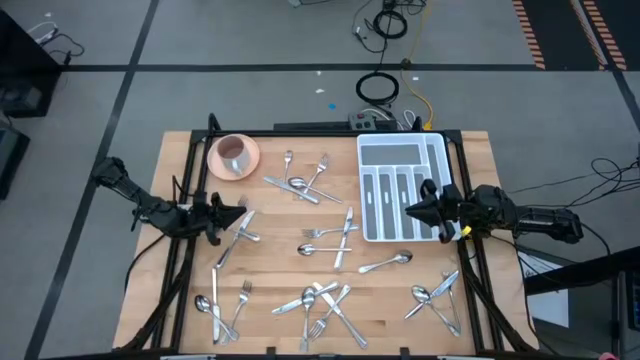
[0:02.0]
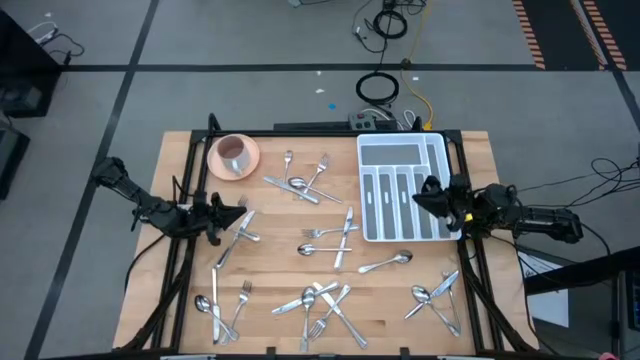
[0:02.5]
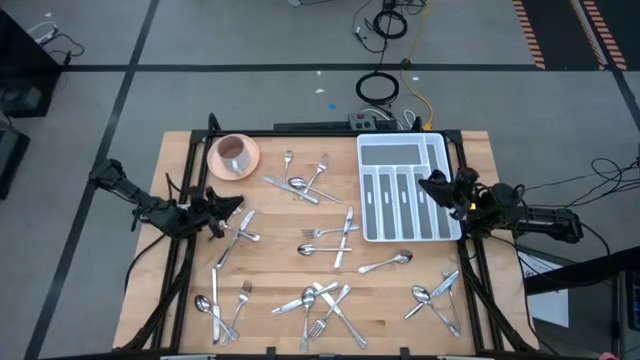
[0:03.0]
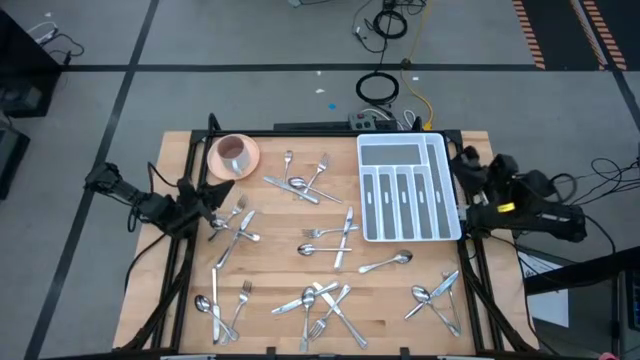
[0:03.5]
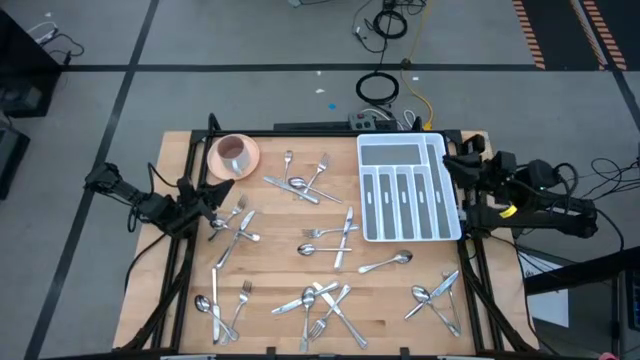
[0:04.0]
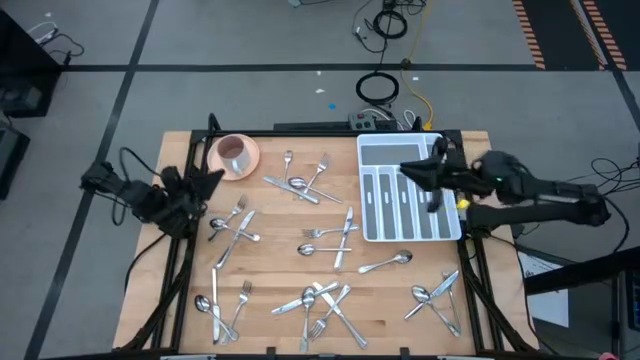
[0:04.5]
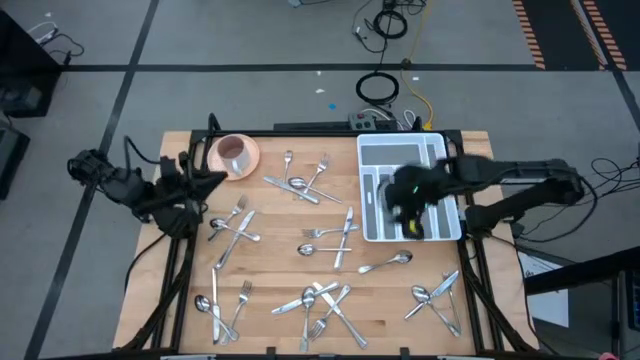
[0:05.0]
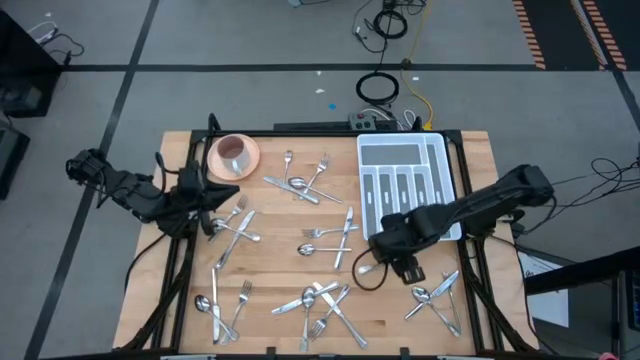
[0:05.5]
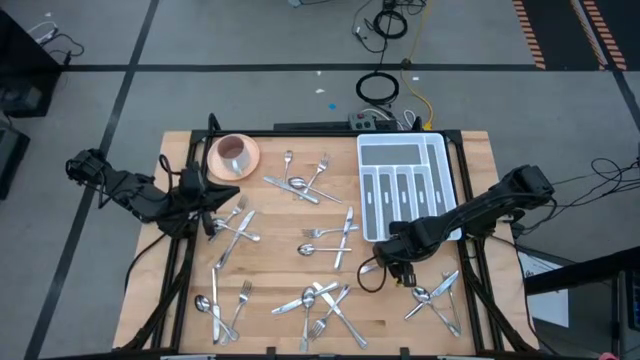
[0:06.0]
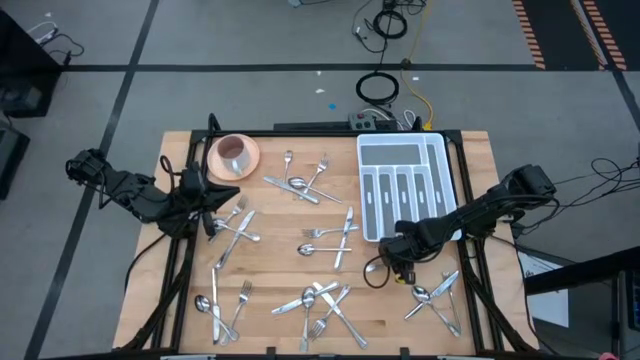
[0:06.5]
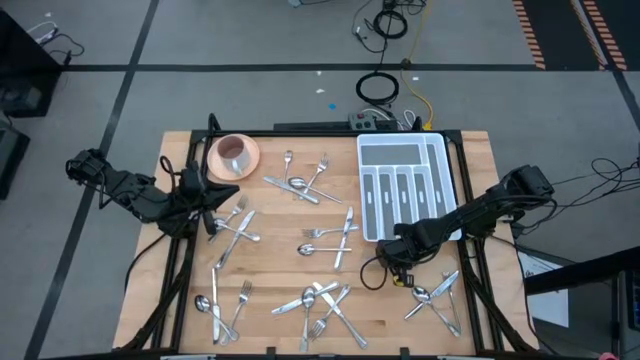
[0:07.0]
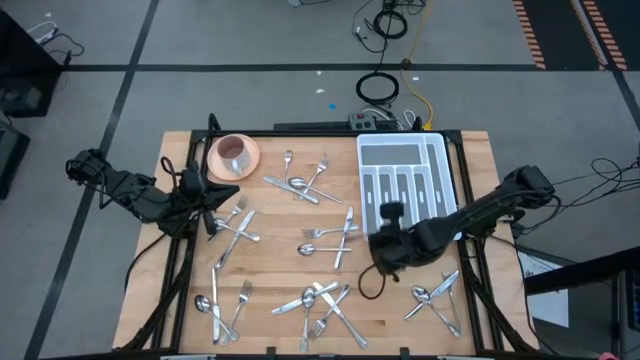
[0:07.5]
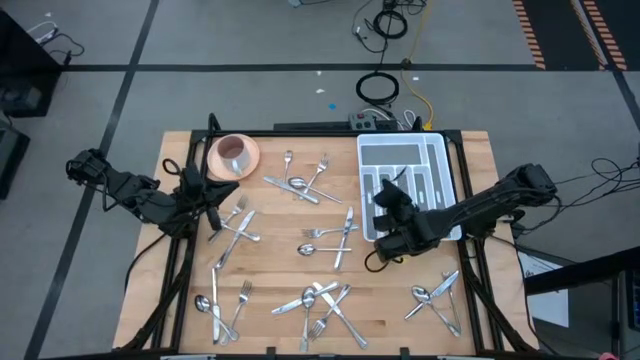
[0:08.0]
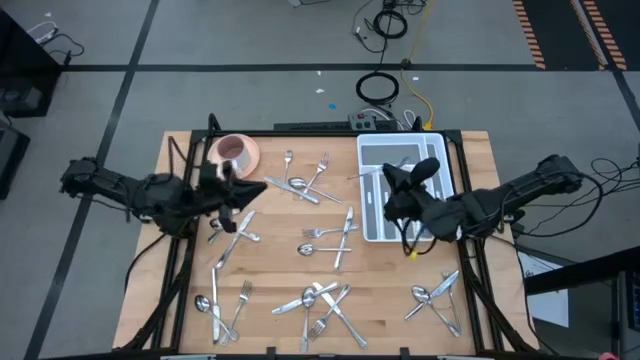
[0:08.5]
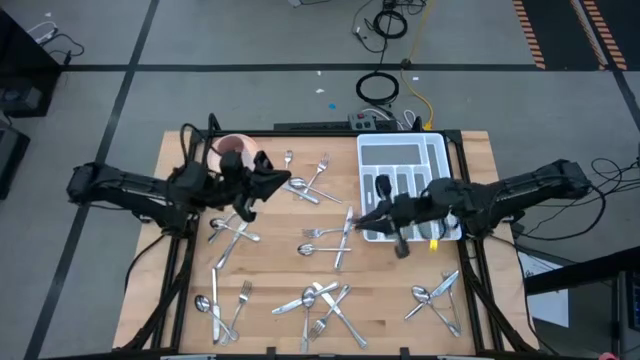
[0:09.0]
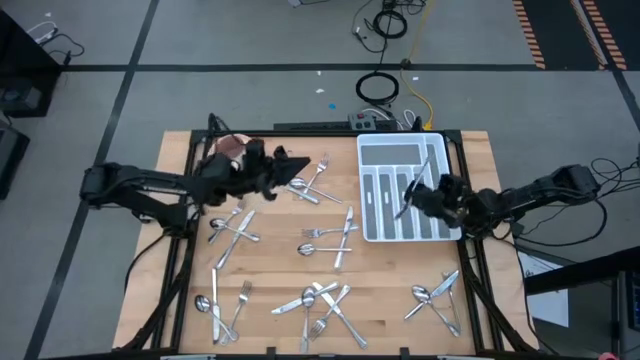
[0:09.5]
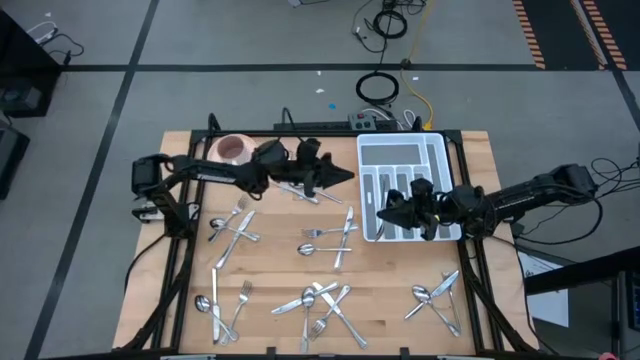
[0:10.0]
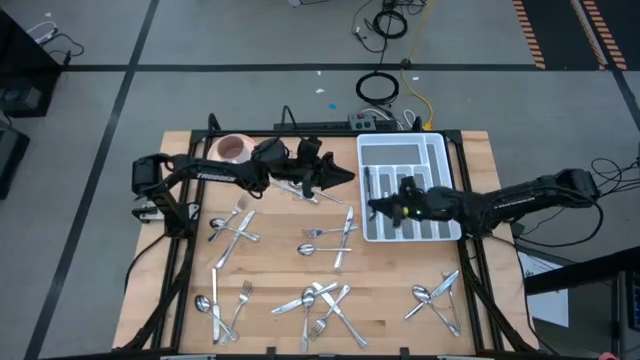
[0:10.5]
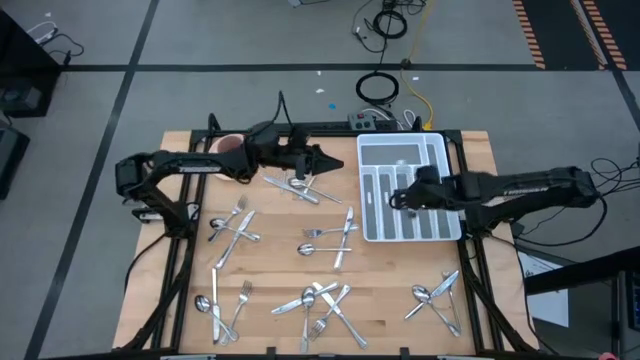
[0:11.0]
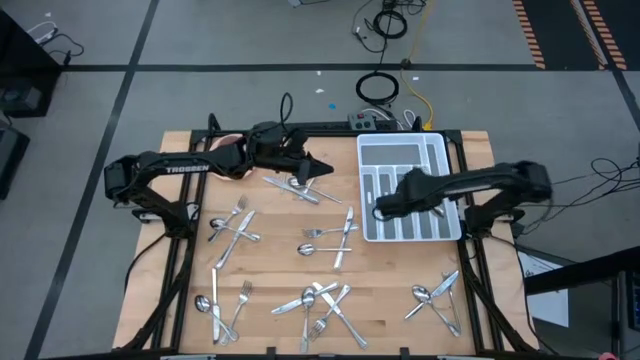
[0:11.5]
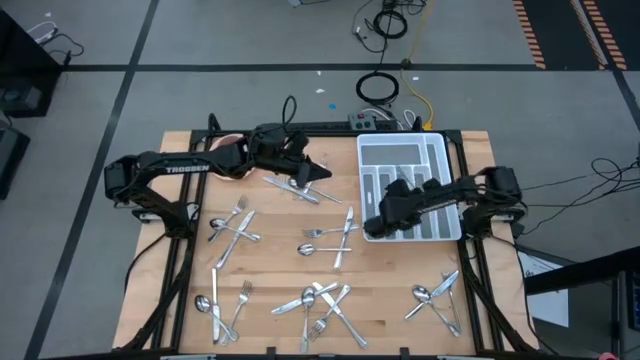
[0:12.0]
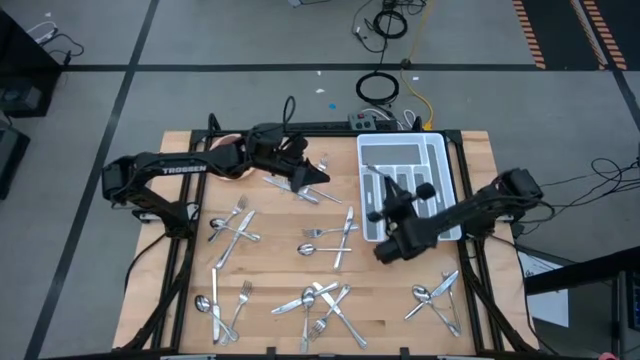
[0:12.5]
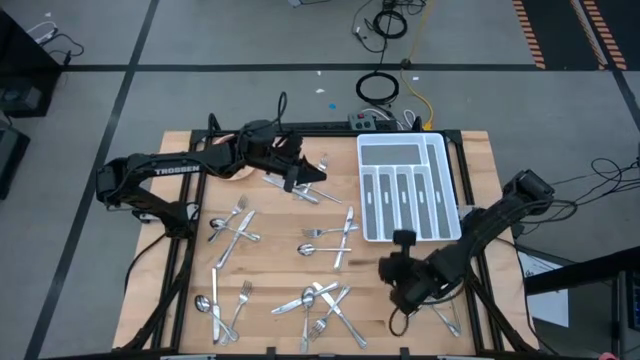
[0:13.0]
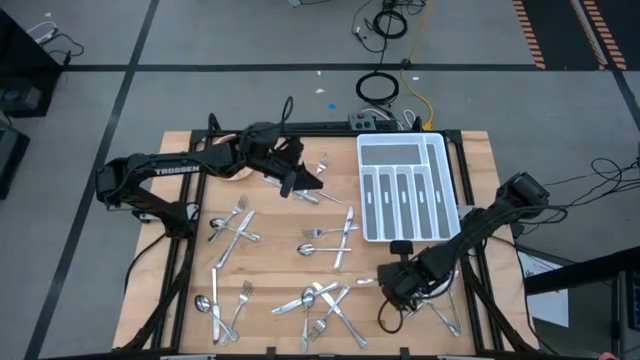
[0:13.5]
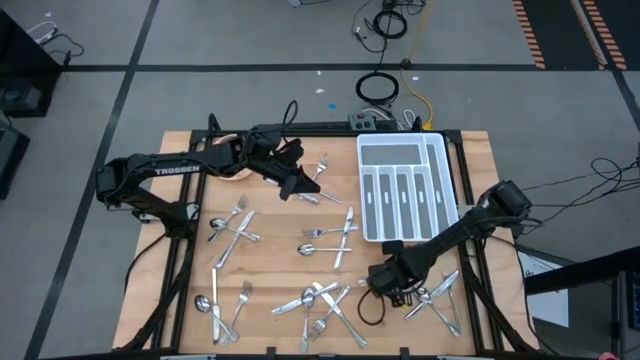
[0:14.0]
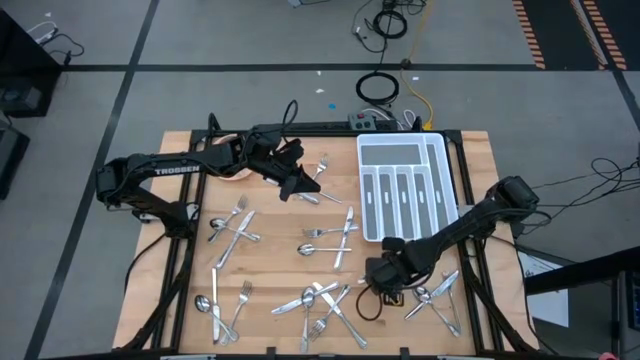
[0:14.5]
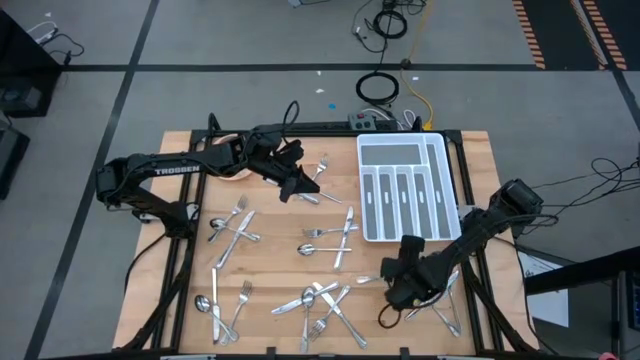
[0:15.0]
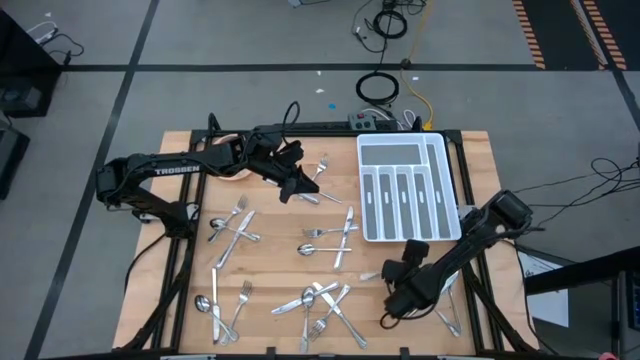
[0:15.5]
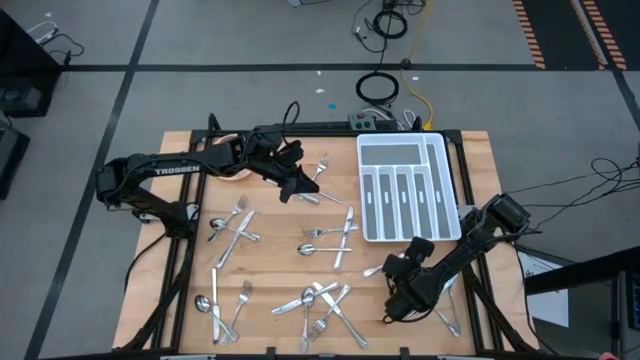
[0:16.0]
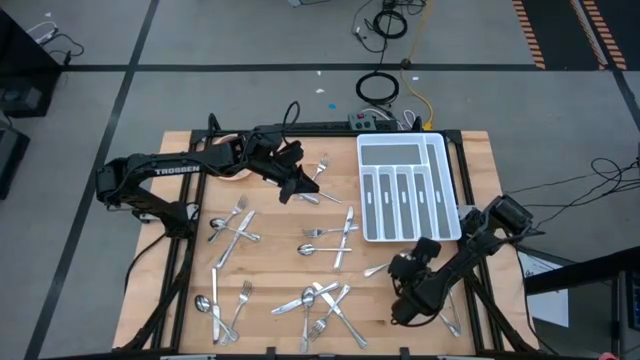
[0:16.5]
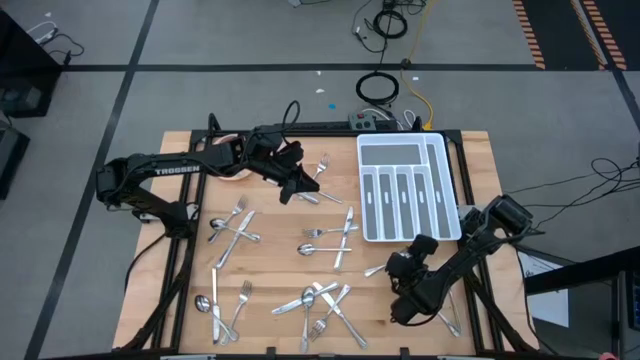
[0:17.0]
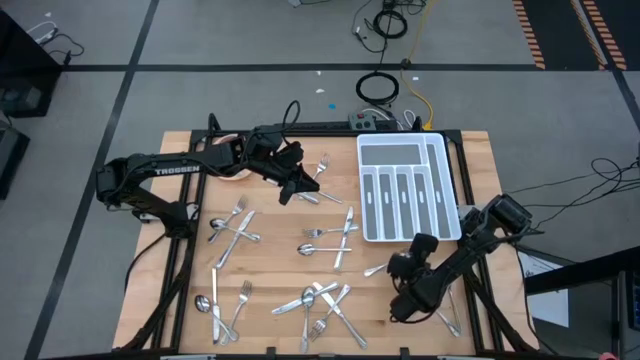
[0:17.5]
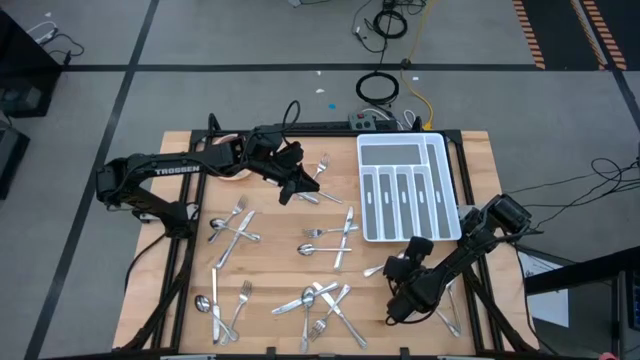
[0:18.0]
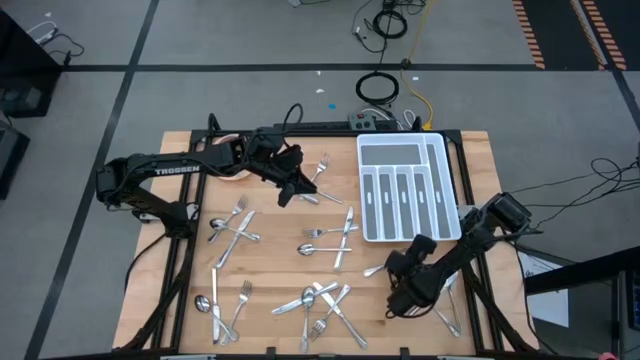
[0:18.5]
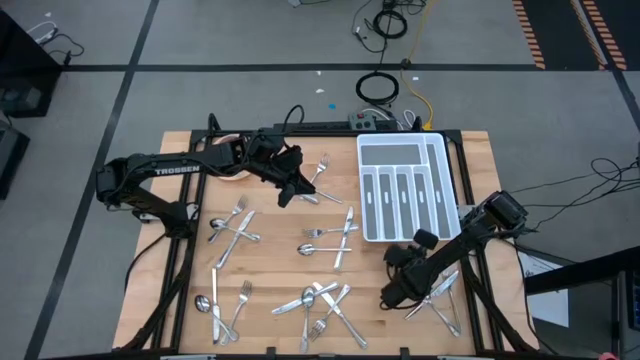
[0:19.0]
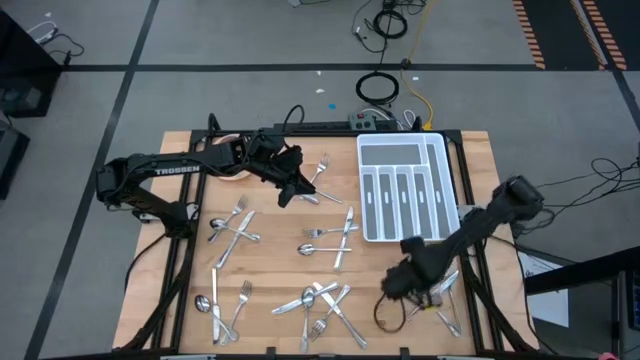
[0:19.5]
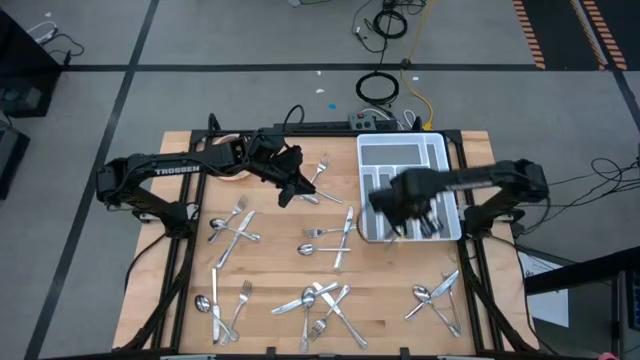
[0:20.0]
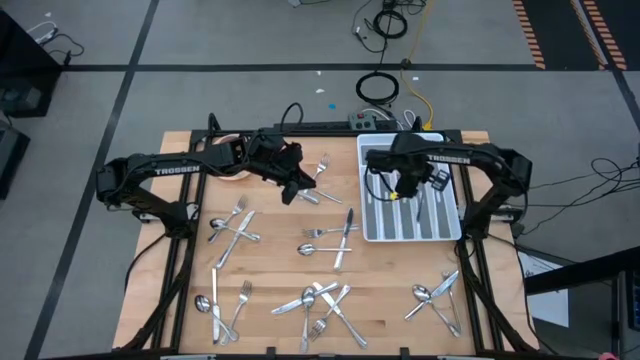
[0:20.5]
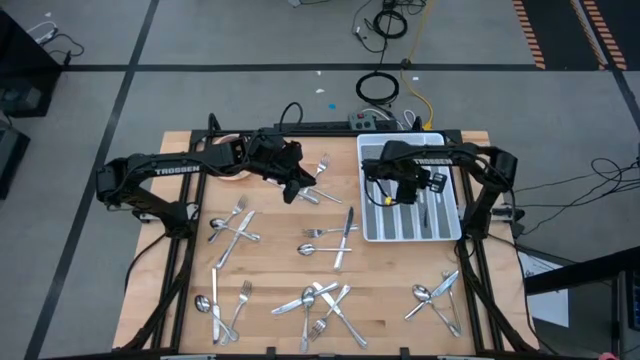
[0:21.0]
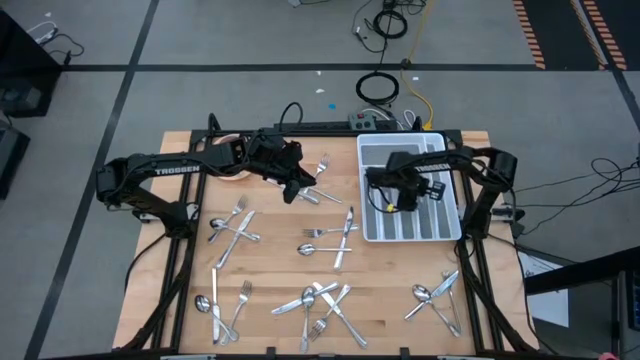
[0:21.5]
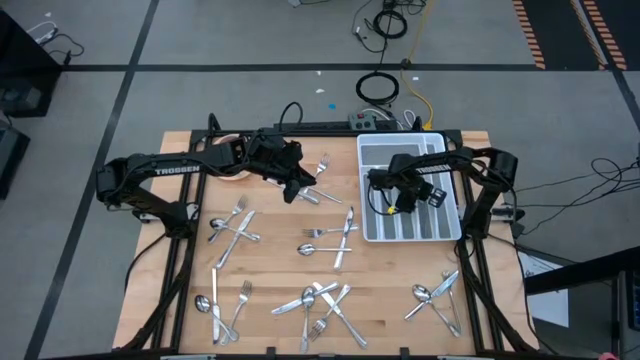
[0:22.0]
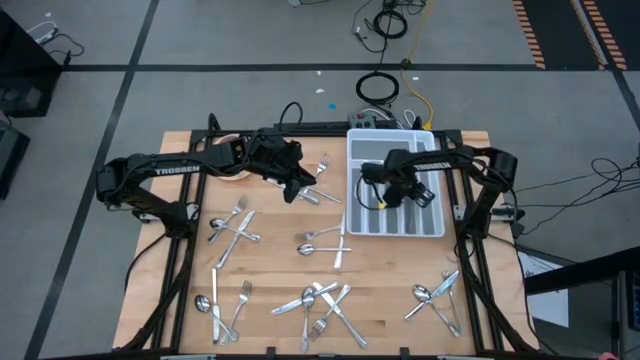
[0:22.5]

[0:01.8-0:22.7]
Task: Sort silverware
Put the silver spoon into the white silverware tray
